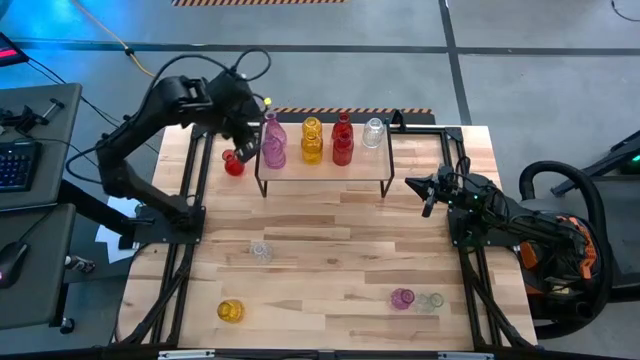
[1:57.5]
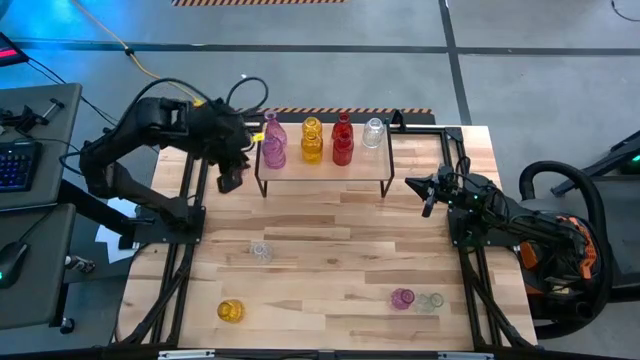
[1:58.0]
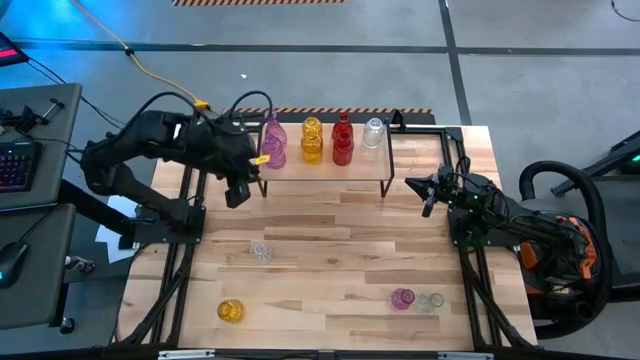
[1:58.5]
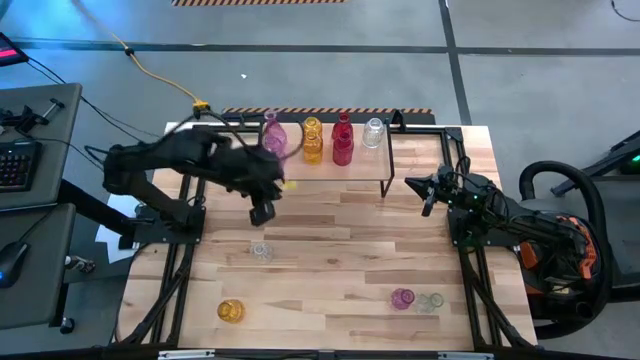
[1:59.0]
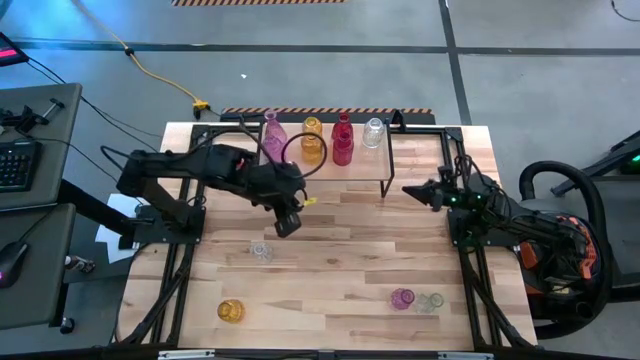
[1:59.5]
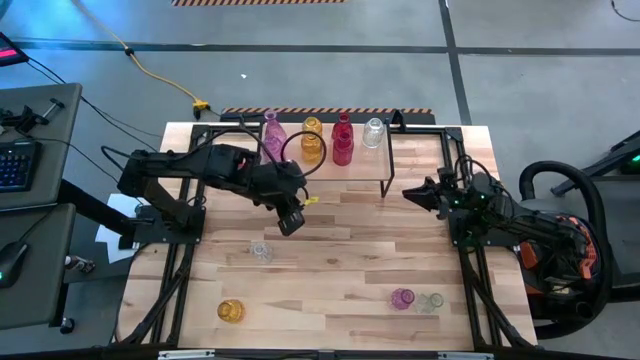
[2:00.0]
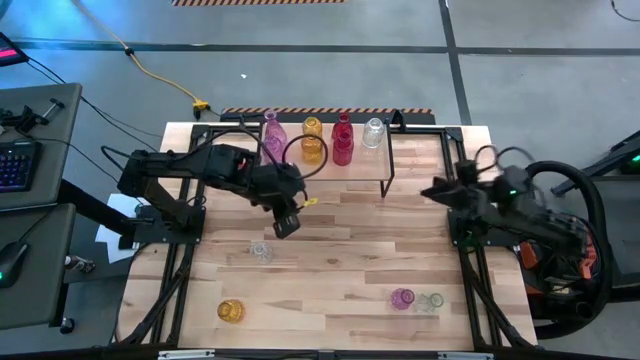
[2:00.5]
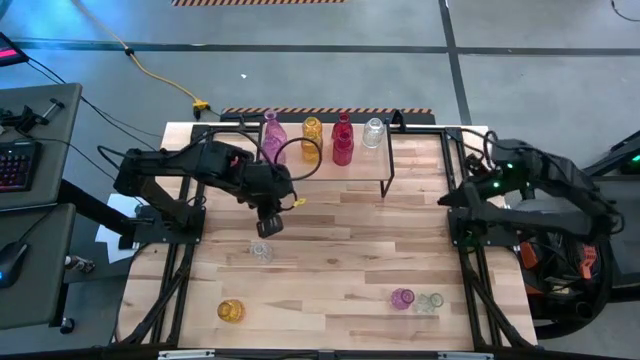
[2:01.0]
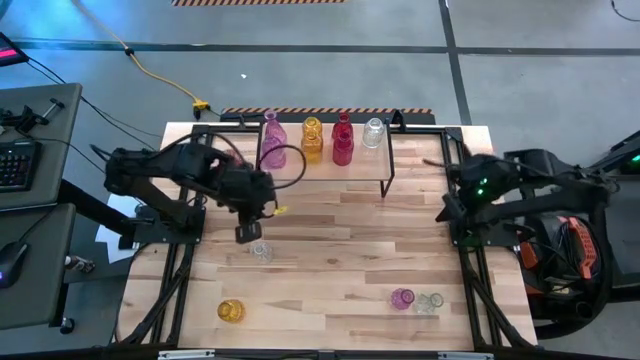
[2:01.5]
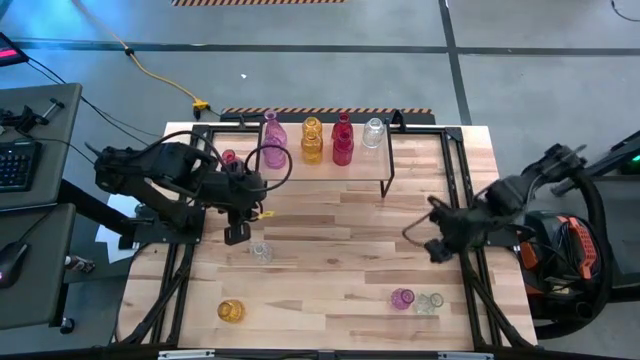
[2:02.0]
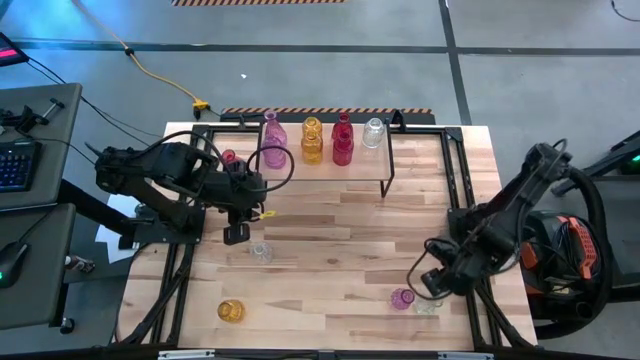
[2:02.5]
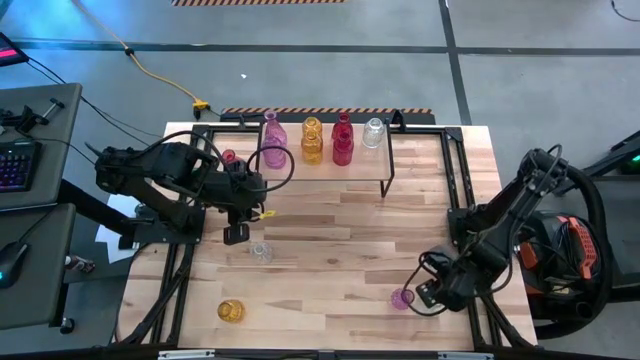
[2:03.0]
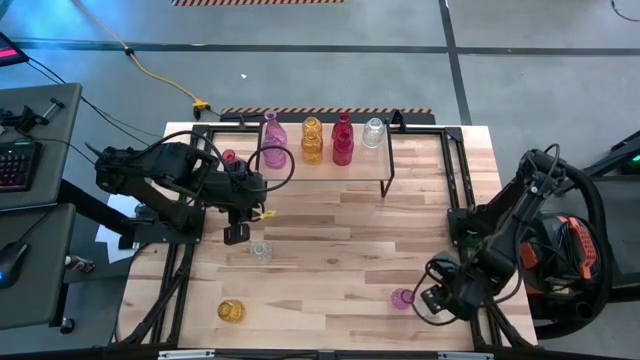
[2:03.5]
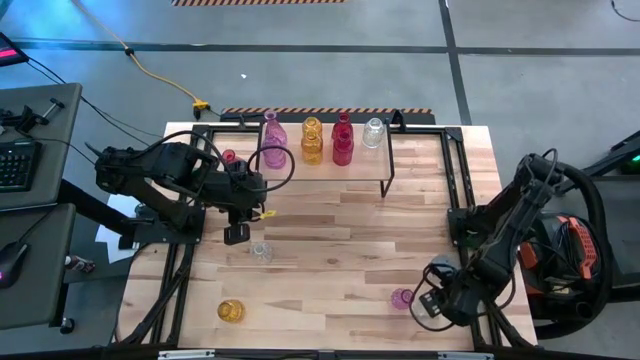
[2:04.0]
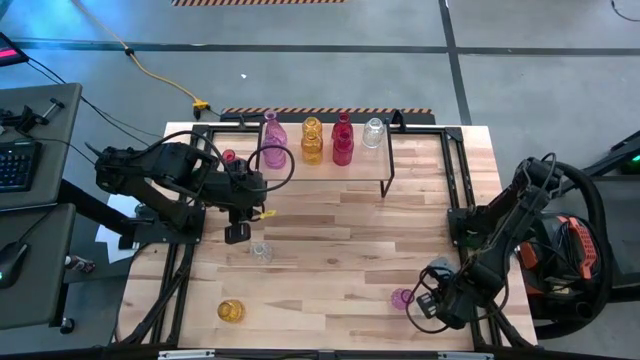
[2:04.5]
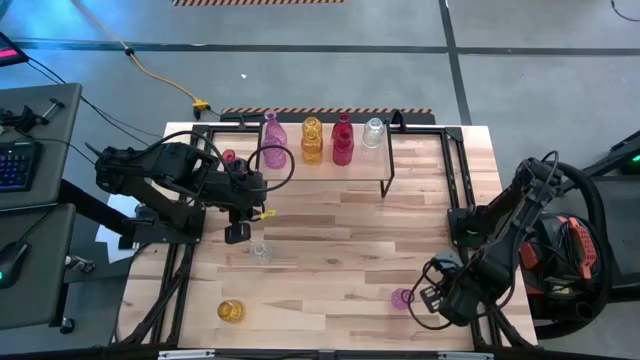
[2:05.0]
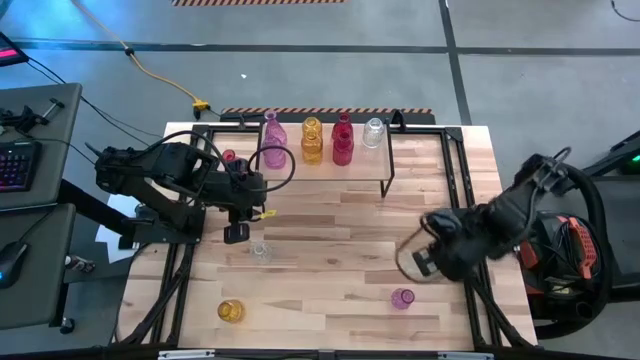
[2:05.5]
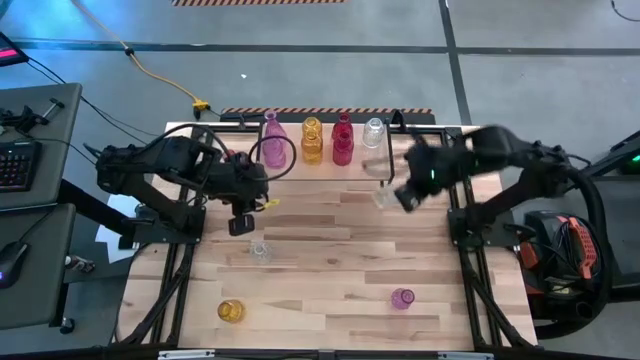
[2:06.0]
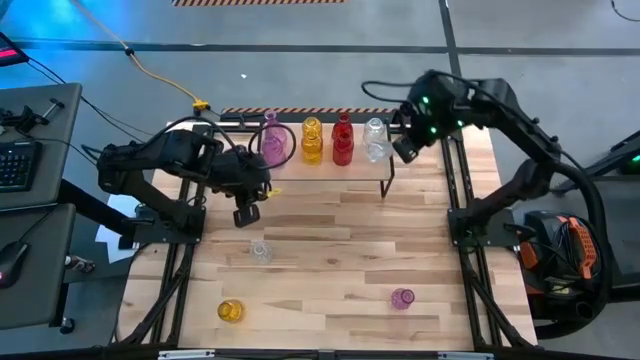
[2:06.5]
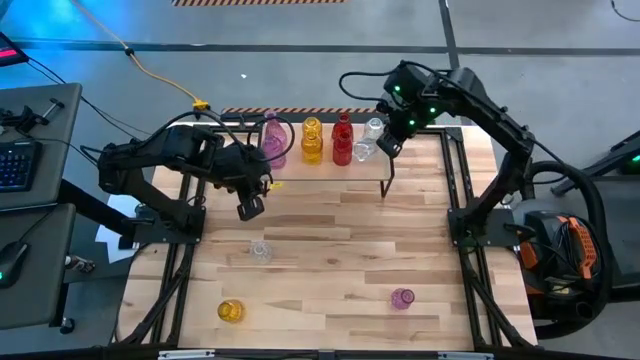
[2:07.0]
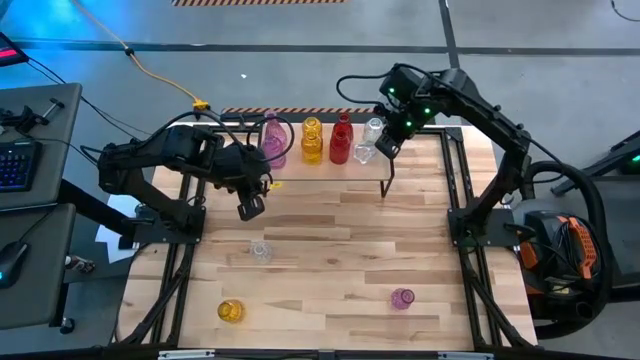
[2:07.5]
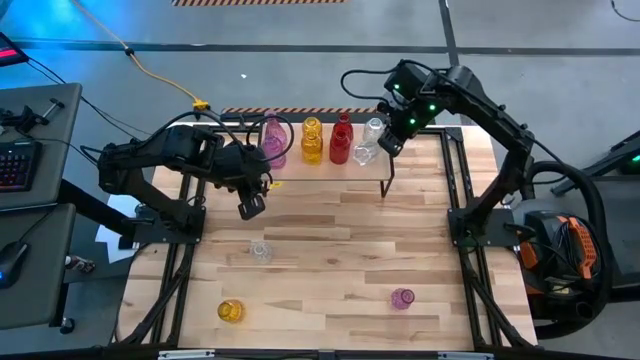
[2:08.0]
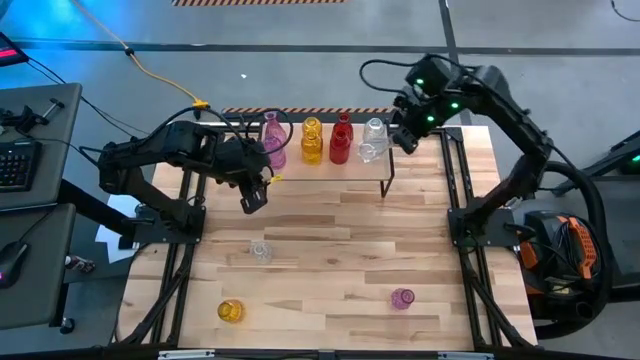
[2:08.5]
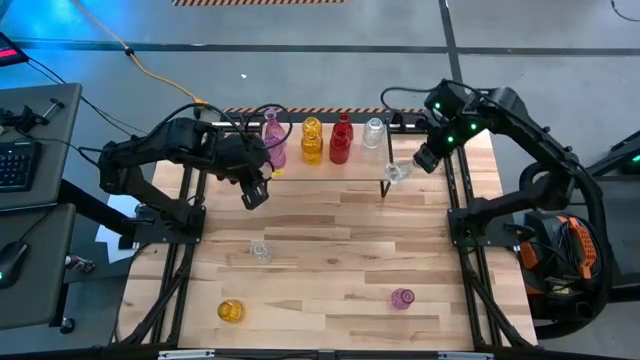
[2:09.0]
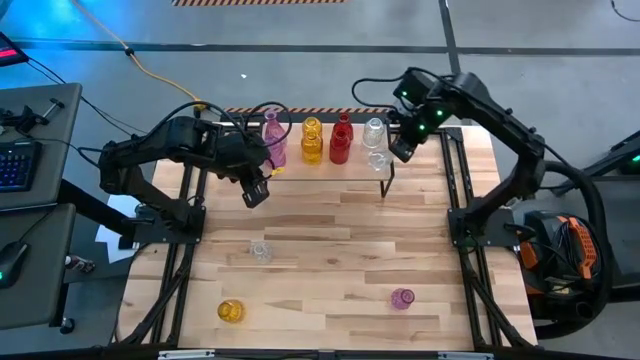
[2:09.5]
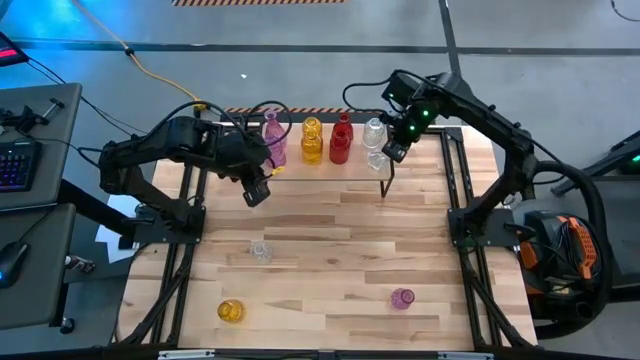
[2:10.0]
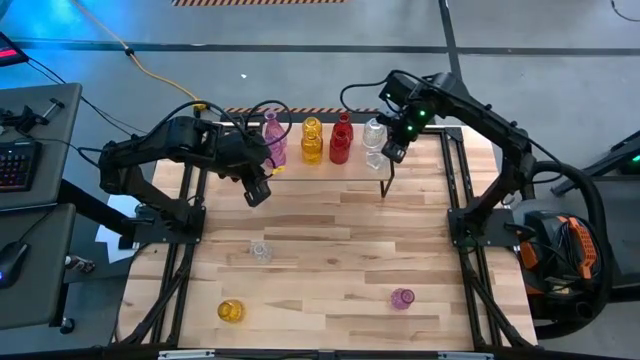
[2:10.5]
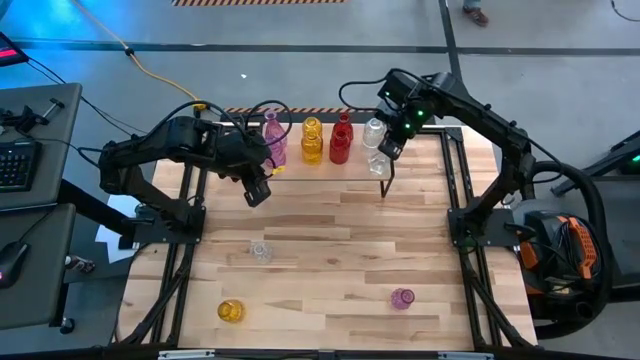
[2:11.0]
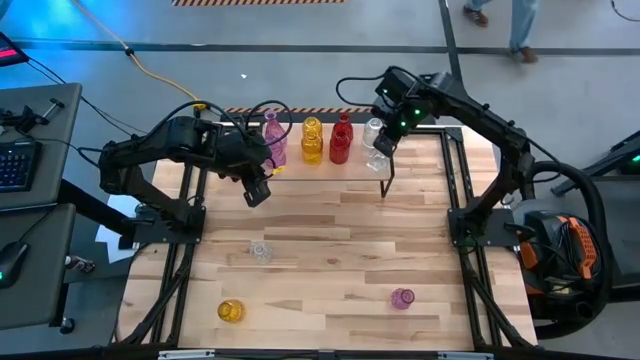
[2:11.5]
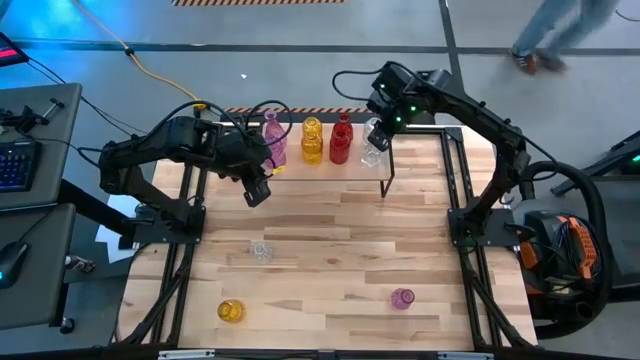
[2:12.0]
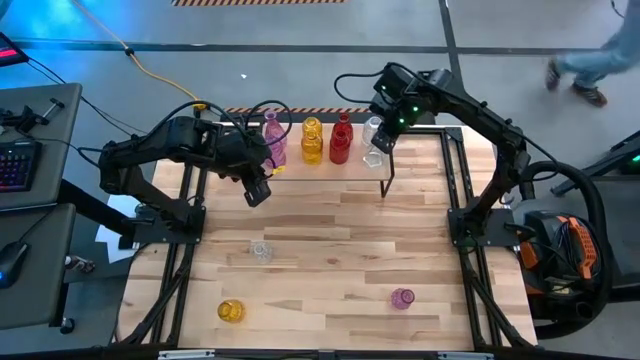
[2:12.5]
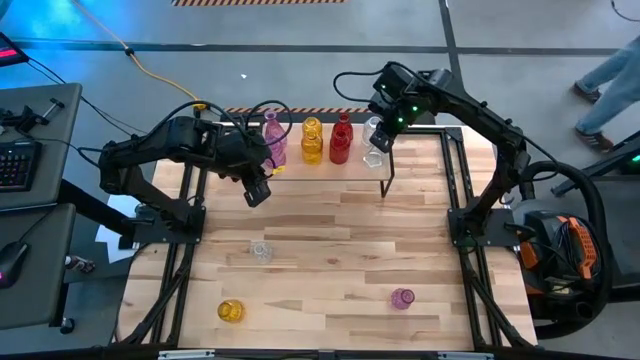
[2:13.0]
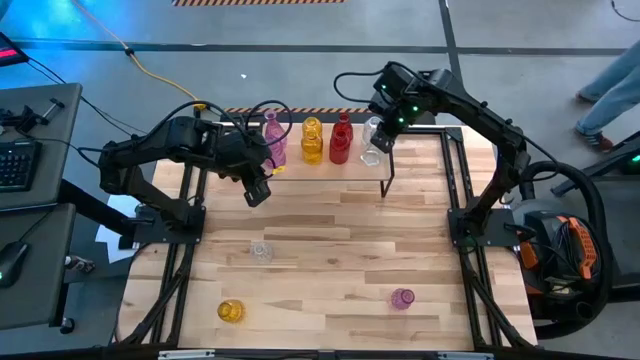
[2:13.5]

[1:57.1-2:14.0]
Task: sort vases onto shelf
Put the right transparent vase on the shelf aligned with the other transparent vase

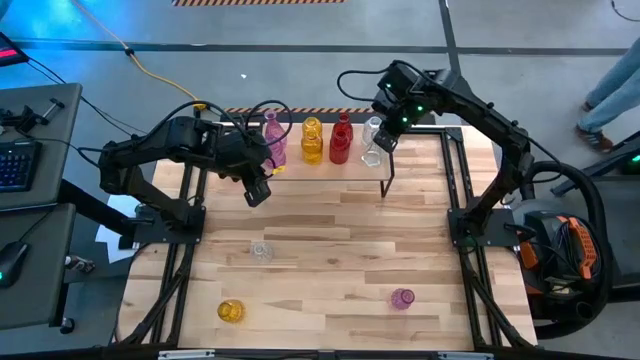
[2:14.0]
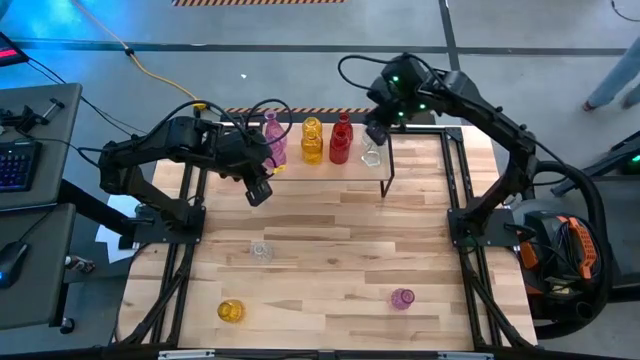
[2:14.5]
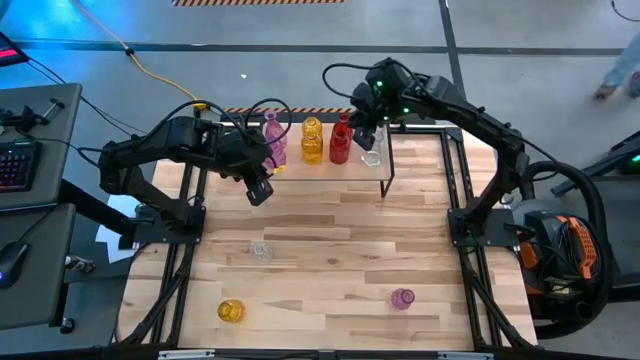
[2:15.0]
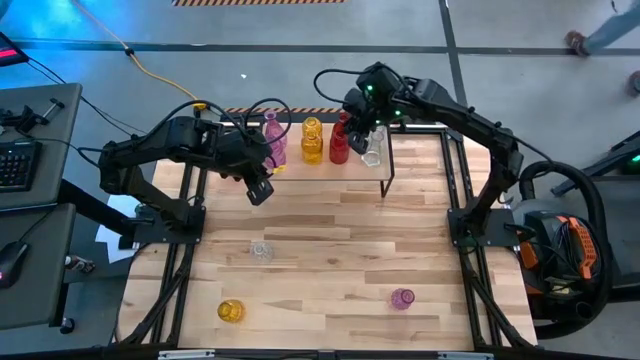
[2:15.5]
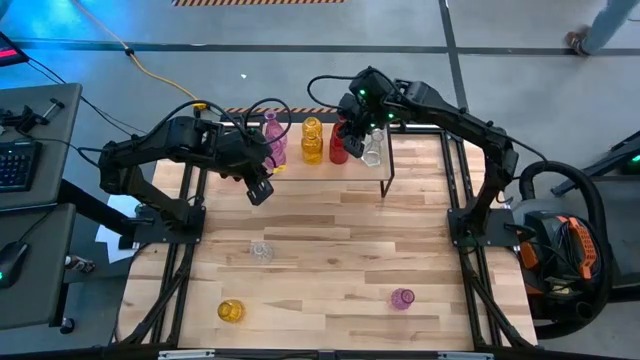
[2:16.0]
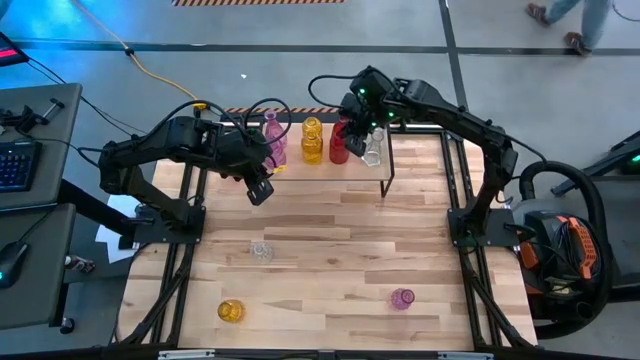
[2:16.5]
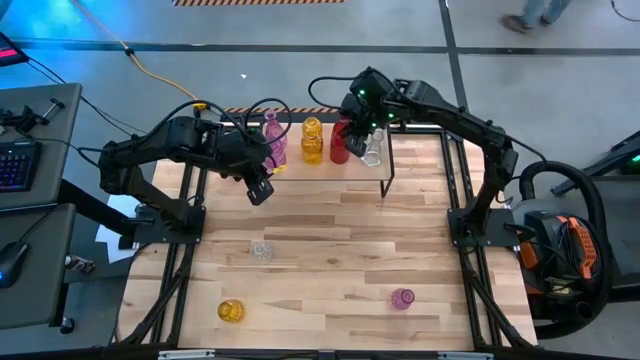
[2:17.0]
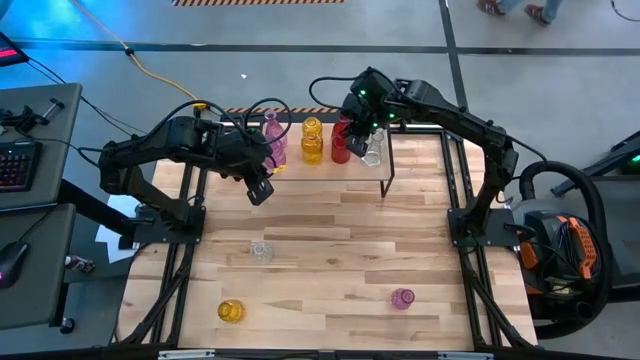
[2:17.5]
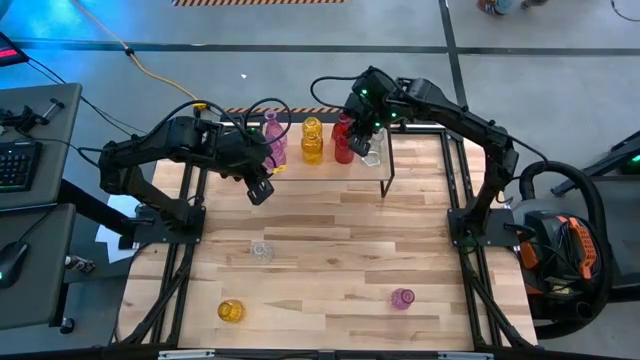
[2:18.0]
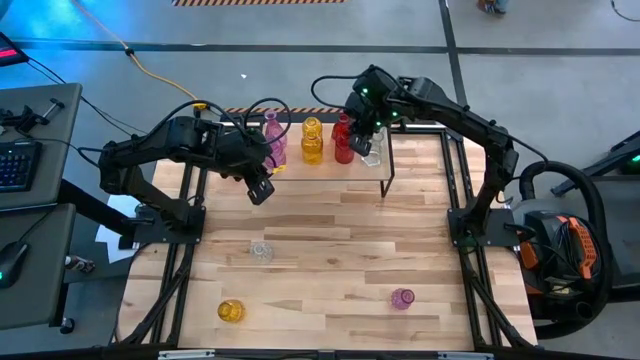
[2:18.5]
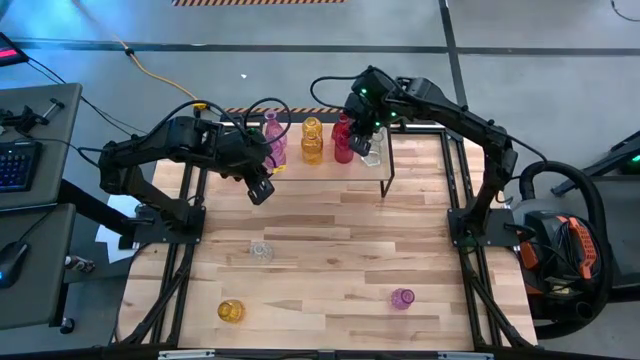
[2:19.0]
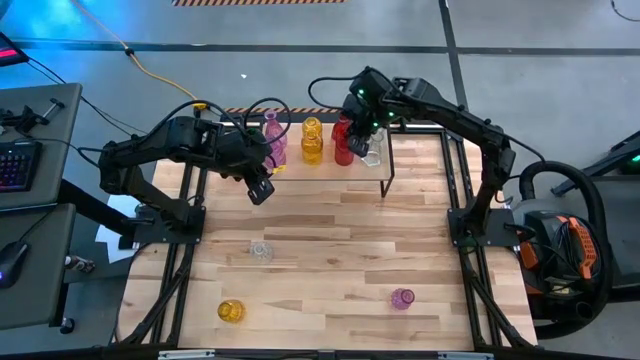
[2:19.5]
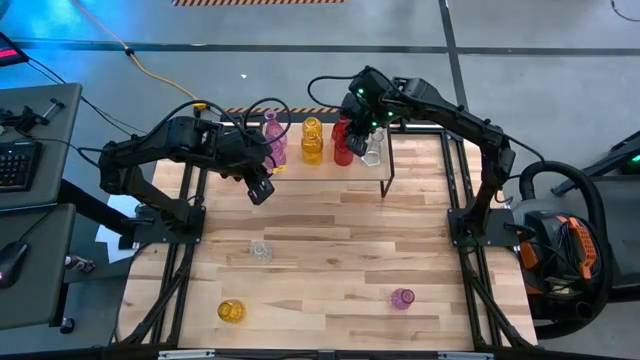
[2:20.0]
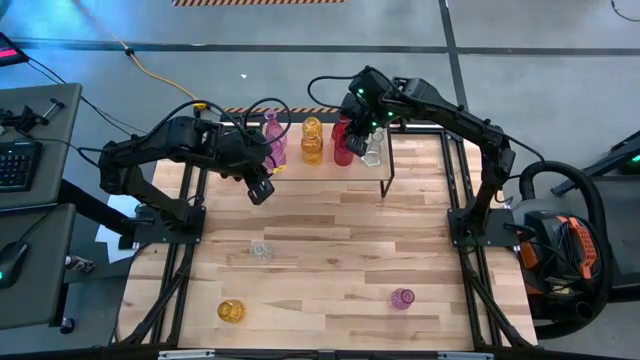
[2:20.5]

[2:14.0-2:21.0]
Adjust the red vase on the shelf
